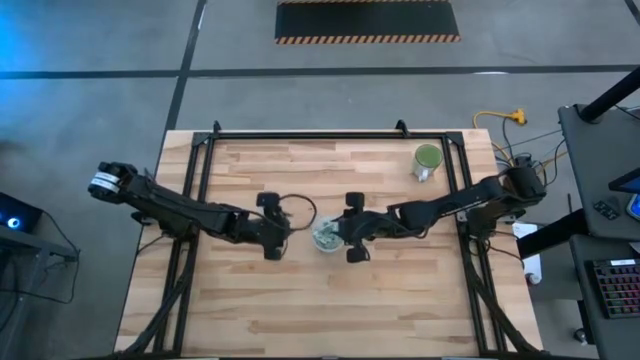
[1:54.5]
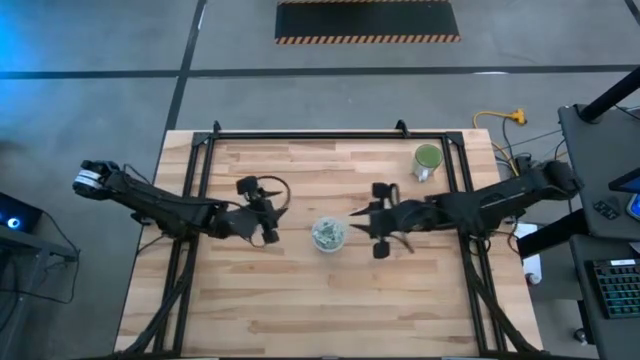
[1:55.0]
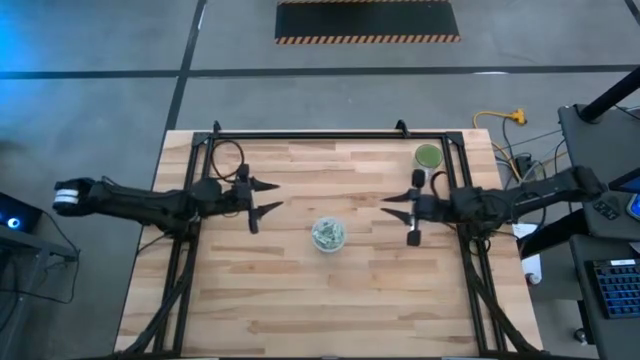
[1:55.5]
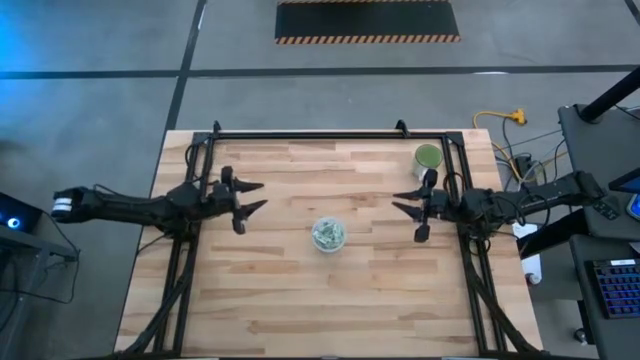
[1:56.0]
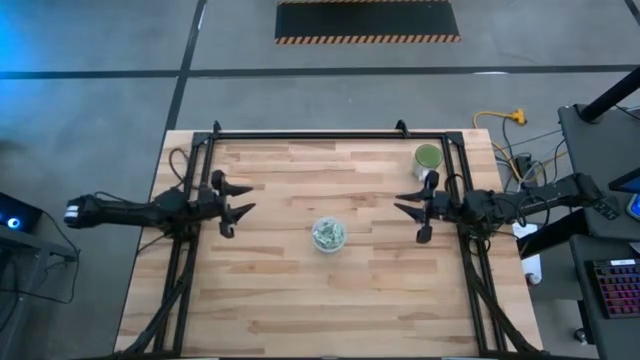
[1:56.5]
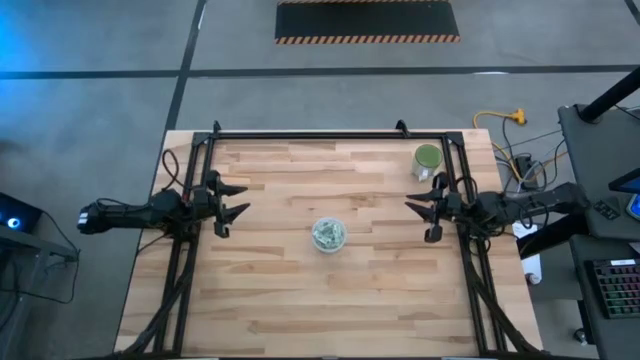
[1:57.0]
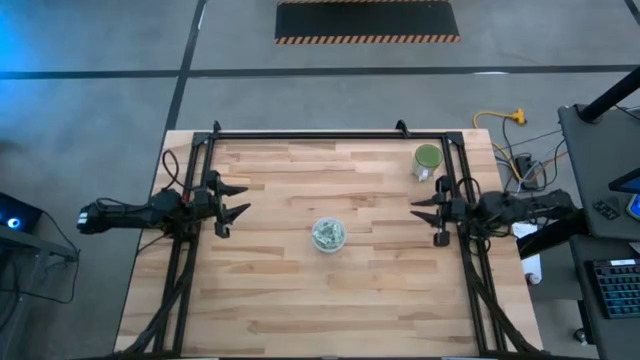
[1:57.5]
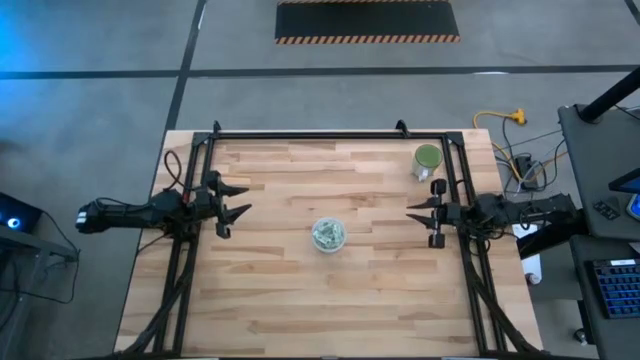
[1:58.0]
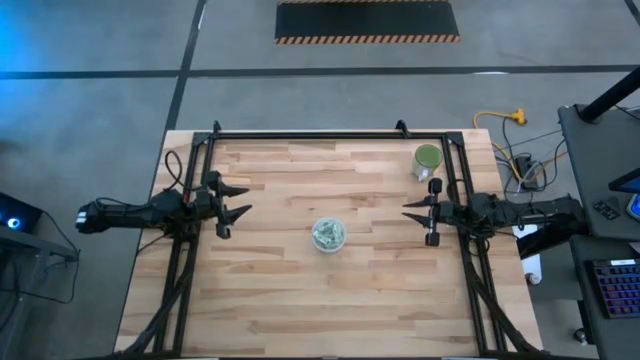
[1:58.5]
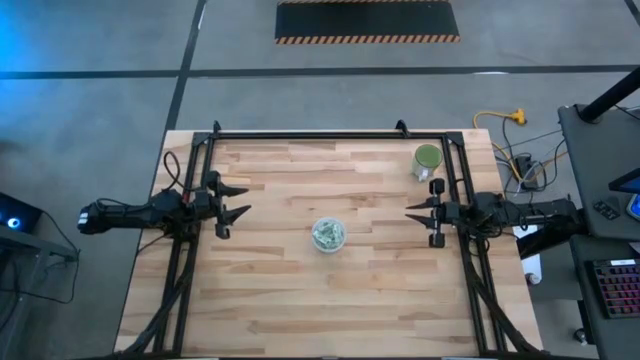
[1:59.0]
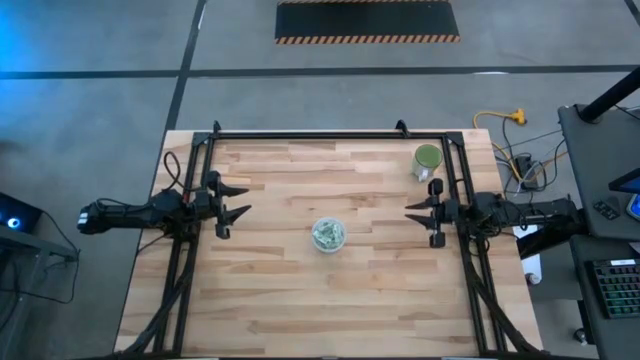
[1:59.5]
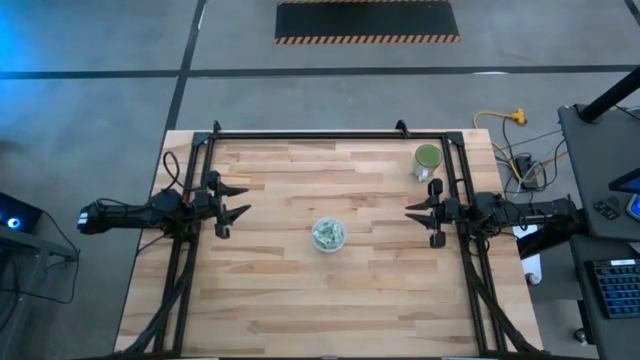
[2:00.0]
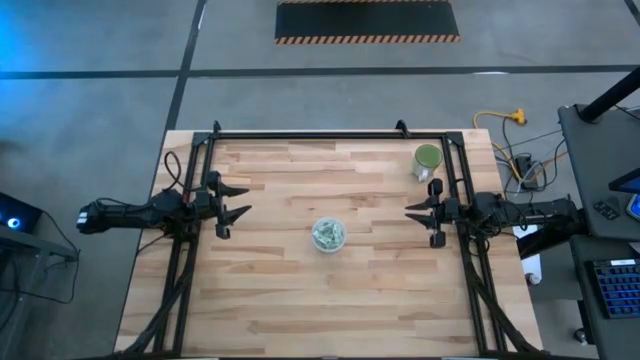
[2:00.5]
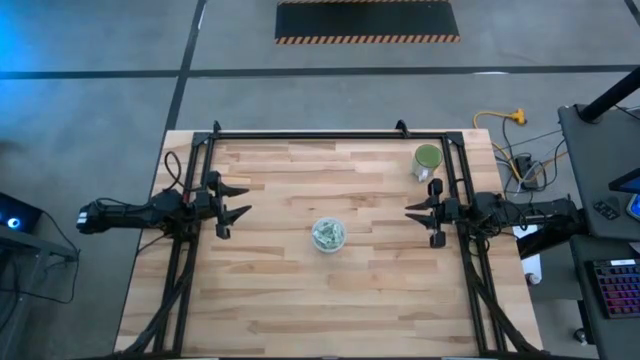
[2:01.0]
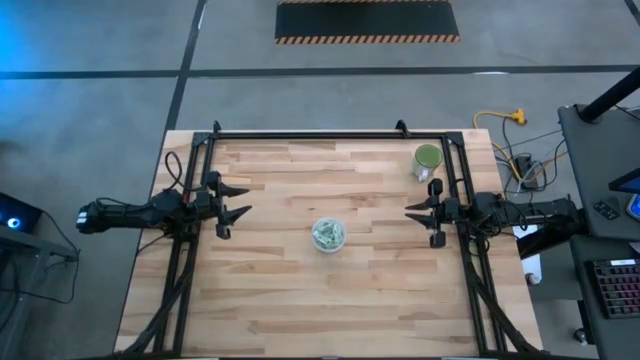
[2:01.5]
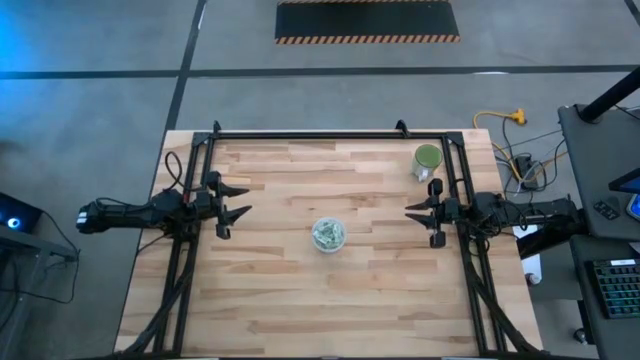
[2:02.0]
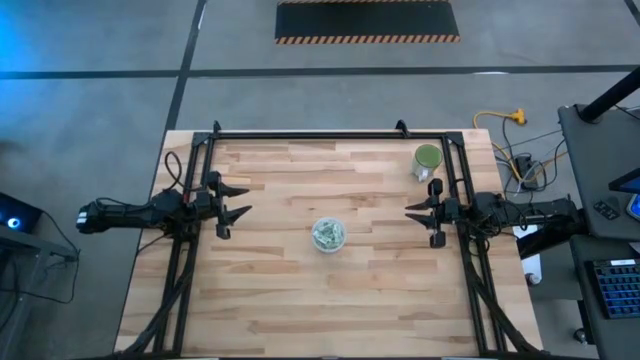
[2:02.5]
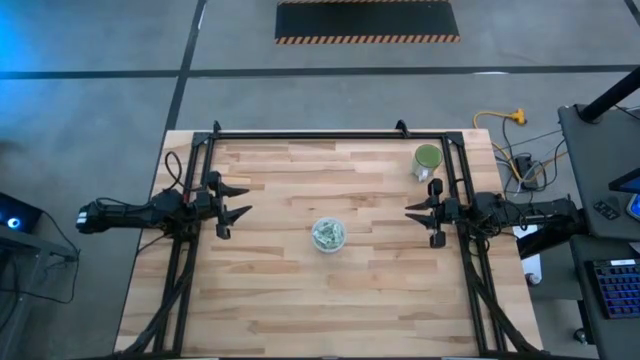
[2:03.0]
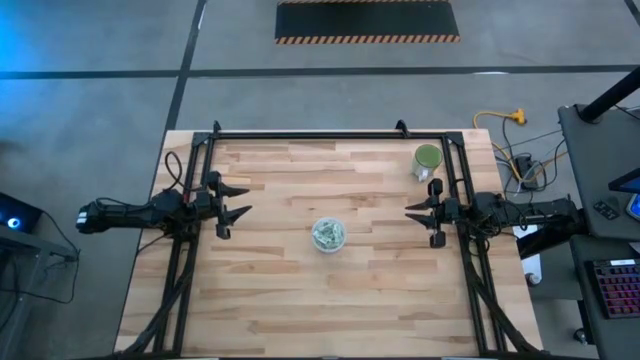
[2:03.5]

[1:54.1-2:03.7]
Task: Pick and place Stevia / Truvia into bins
Return to Home Position

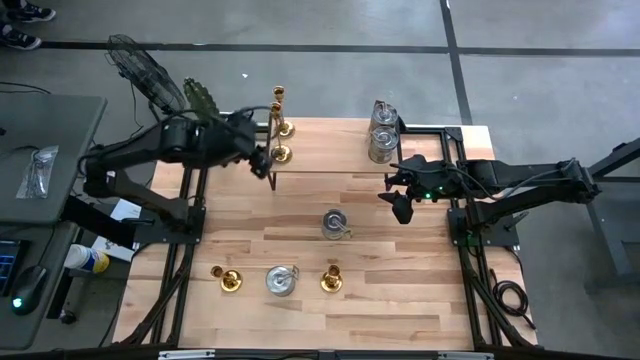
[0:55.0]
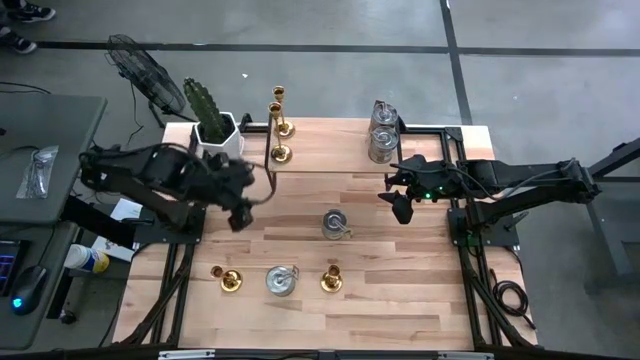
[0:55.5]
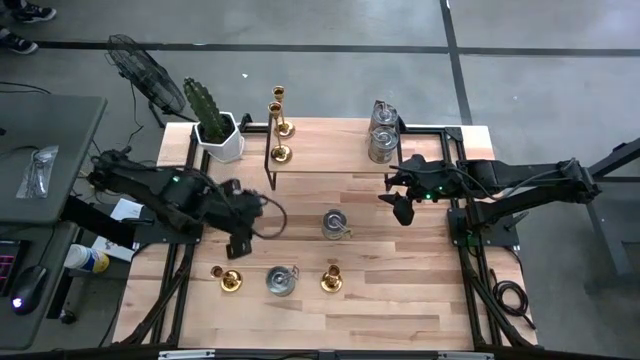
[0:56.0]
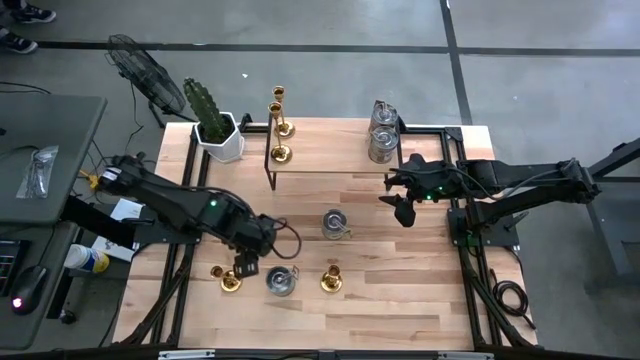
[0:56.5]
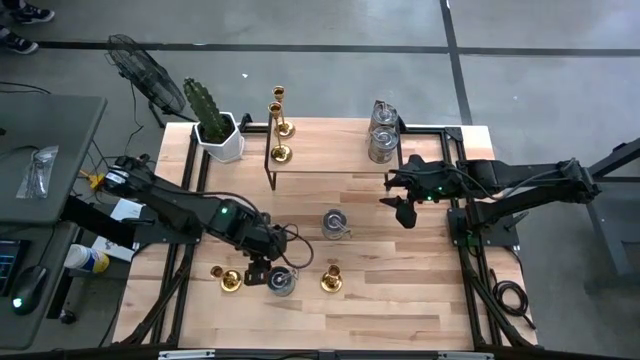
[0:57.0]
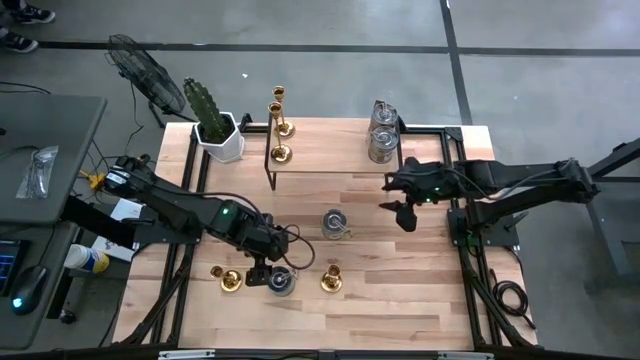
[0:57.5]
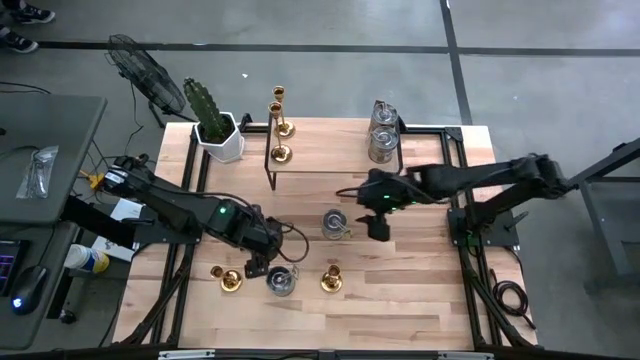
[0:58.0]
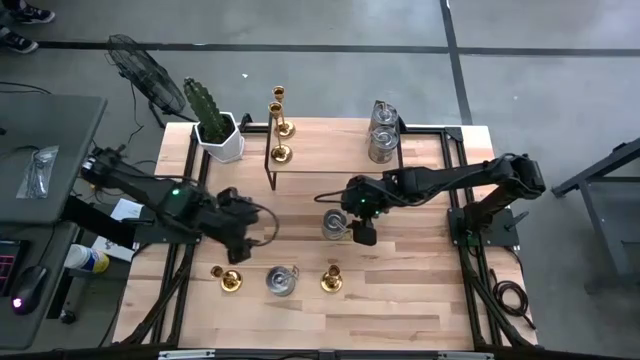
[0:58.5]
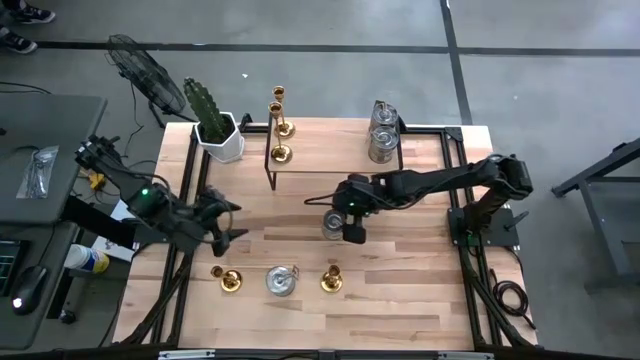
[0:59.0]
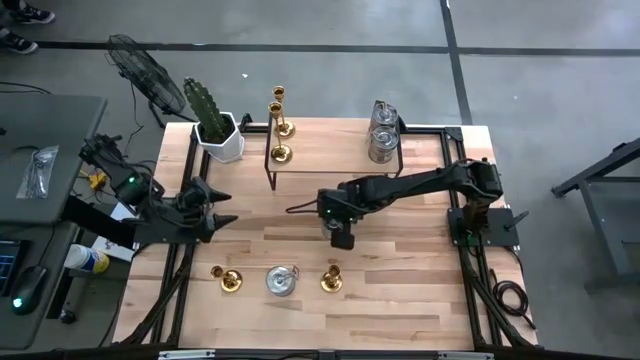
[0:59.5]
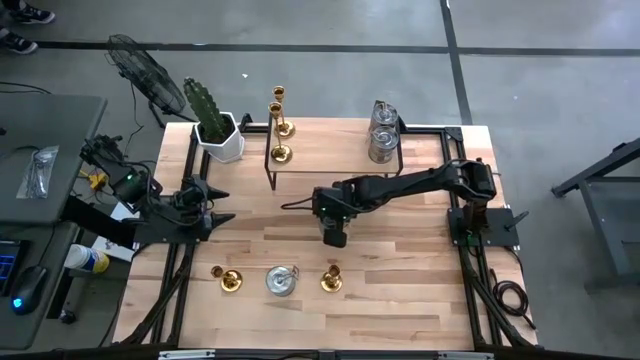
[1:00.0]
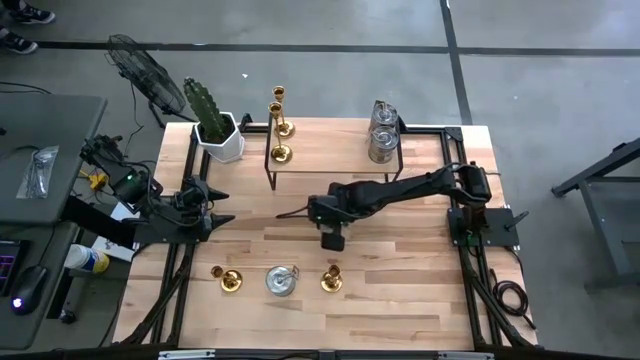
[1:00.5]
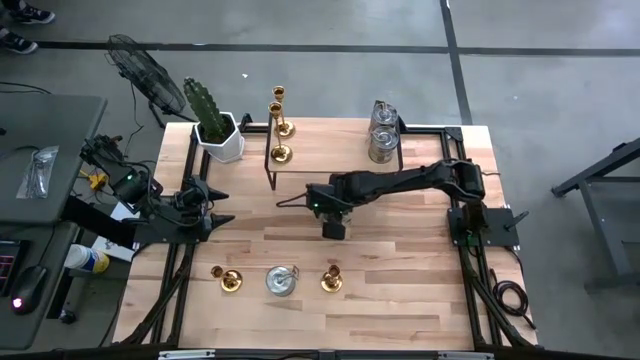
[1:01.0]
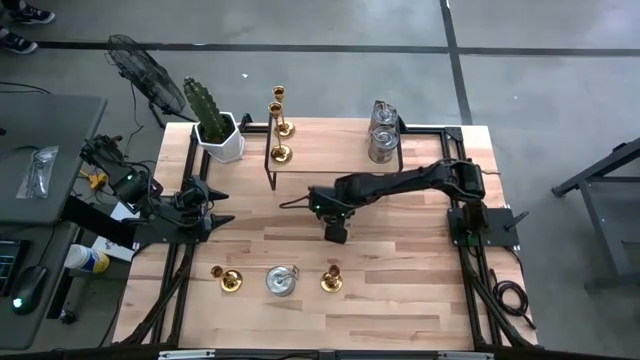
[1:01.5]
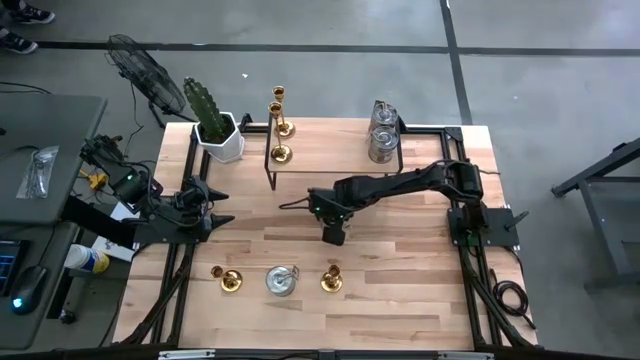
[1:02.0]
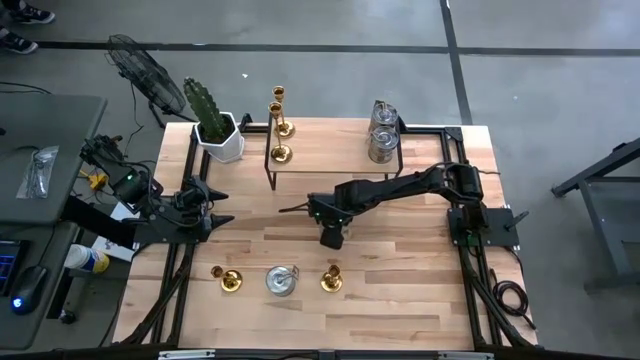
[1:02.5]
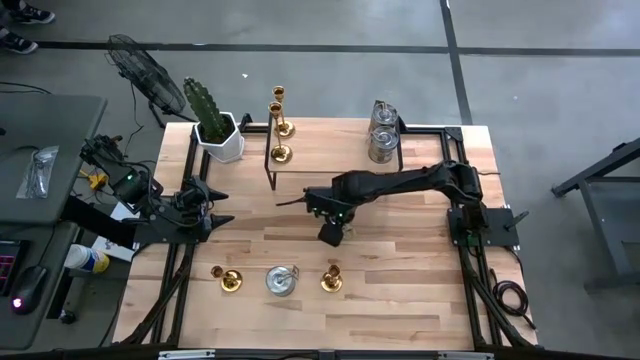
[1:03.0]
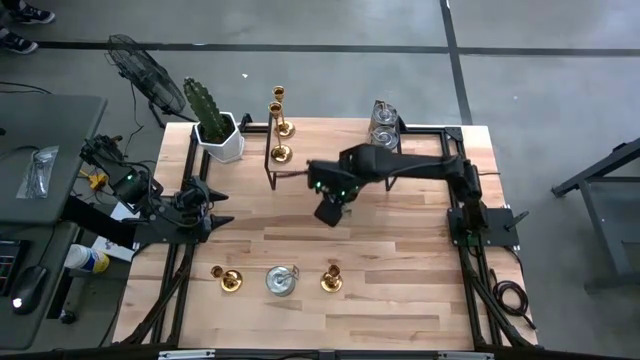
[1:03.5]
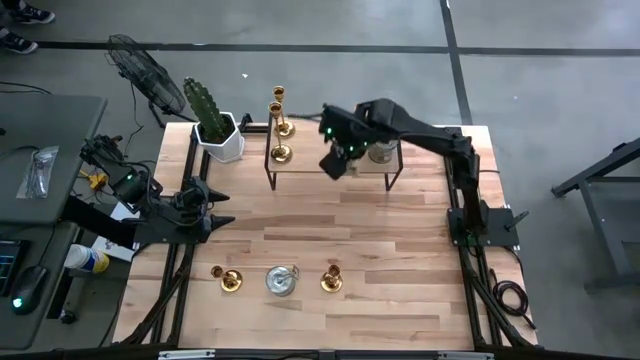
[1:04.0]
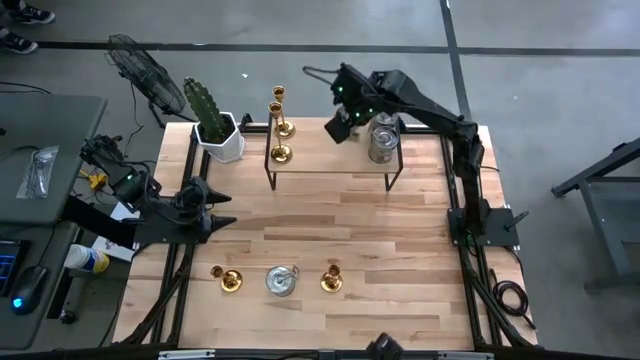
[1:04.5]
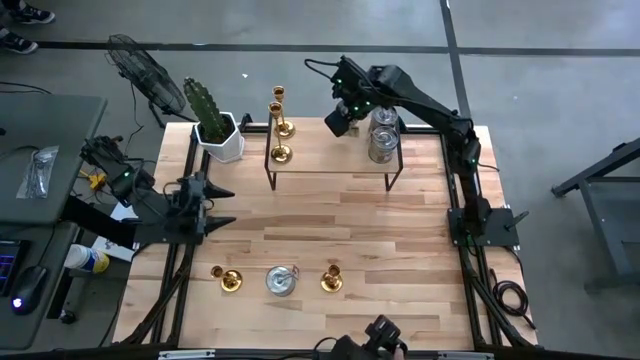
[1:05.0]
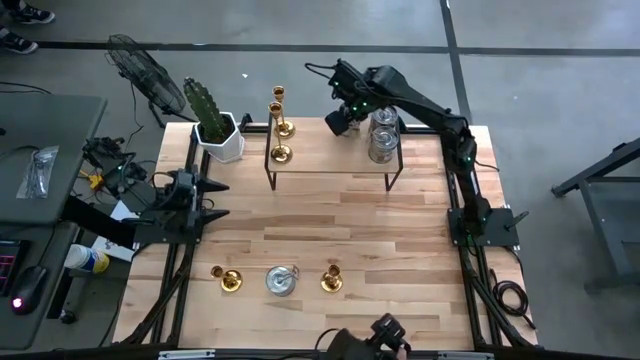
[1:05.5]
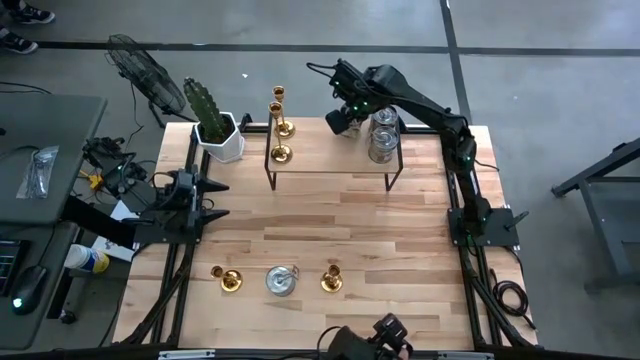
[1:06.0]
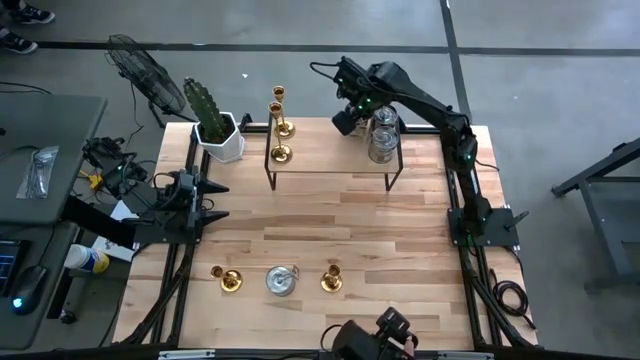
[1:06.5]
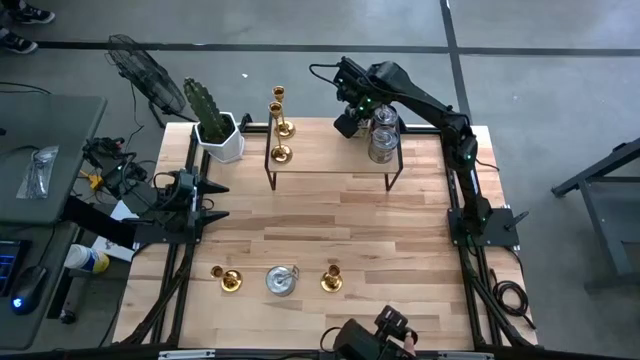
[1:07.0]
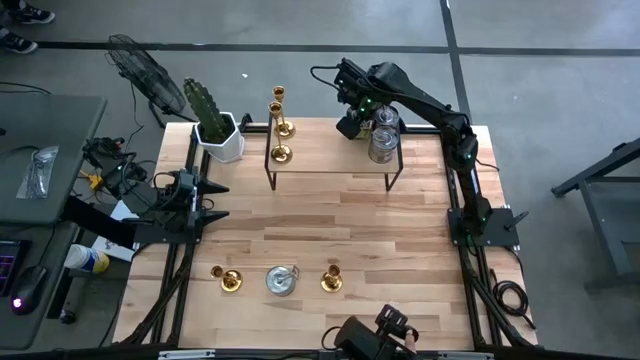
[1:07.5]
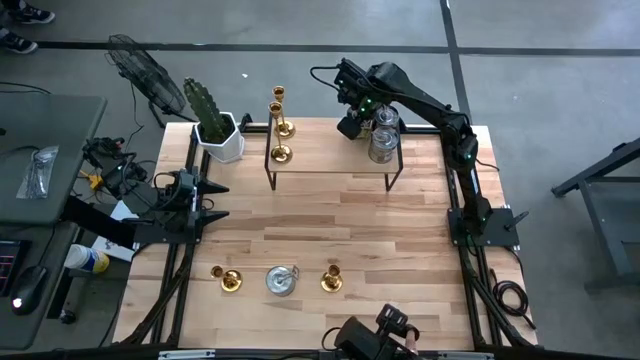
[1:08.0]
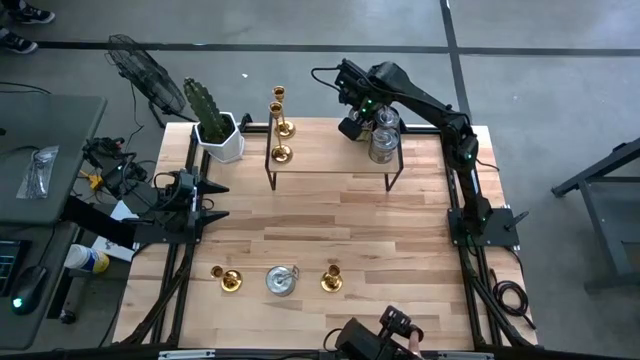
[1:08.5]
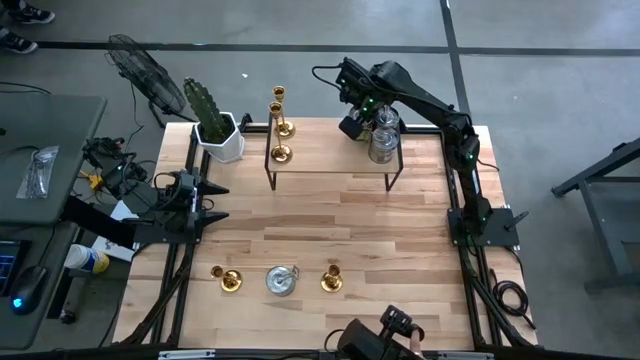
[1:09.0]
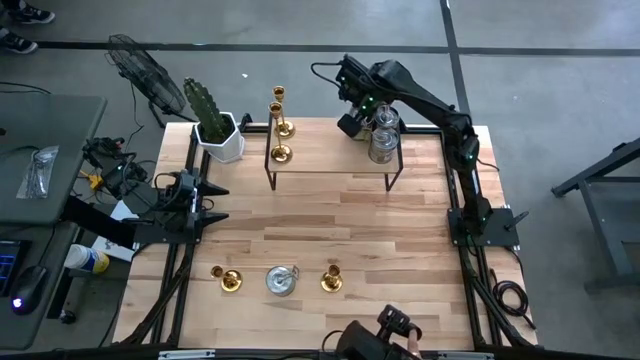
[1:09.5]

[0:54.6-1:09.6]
Task: Pick & Place candle stick holders
Put the silver scented candle on the shelf
